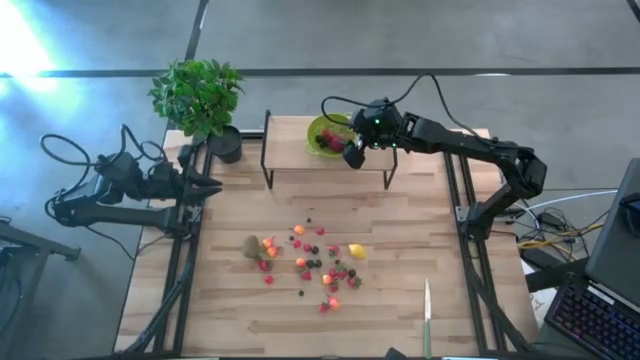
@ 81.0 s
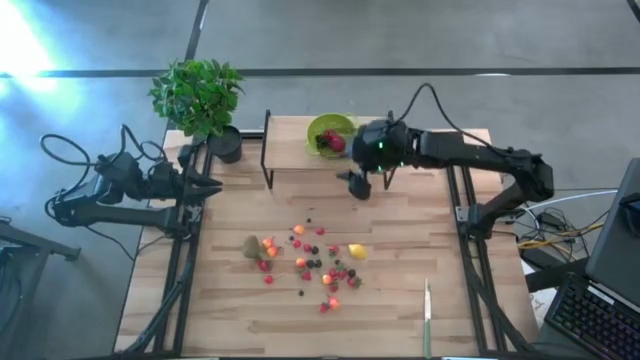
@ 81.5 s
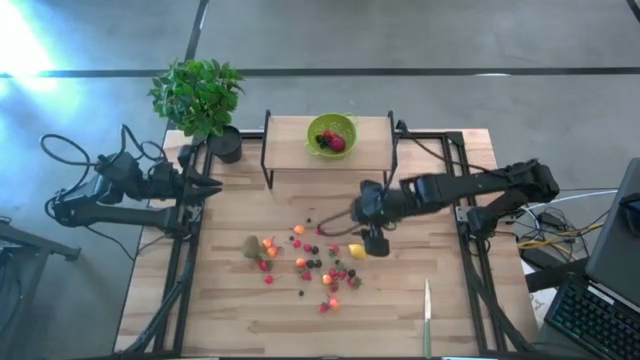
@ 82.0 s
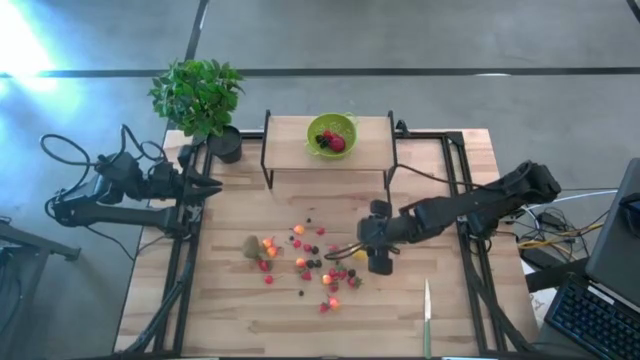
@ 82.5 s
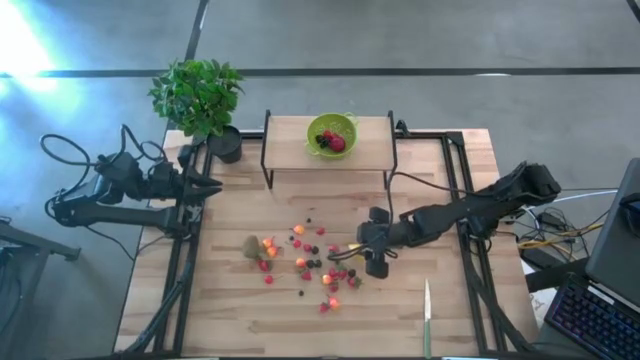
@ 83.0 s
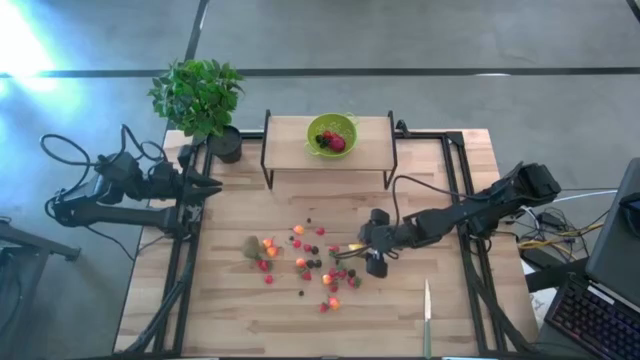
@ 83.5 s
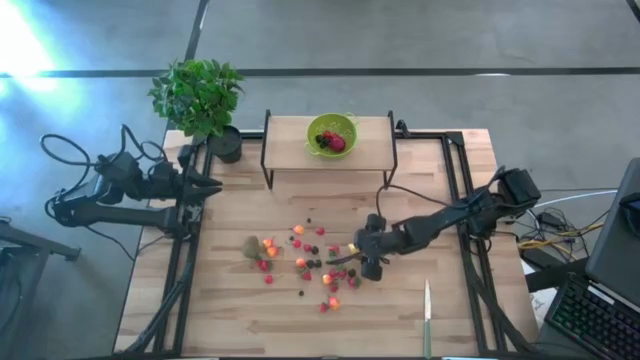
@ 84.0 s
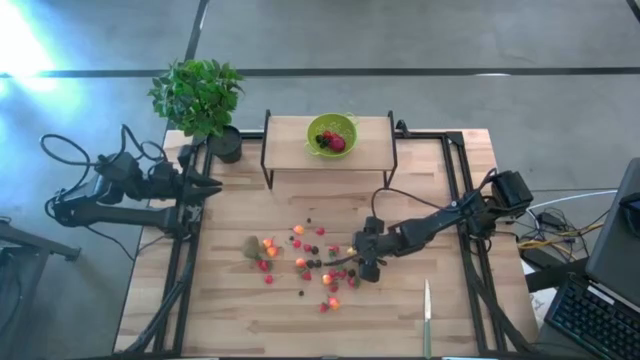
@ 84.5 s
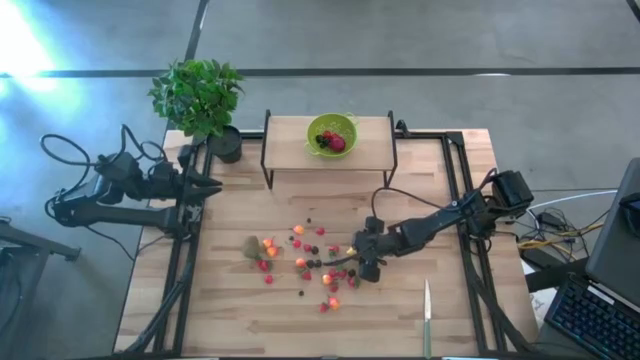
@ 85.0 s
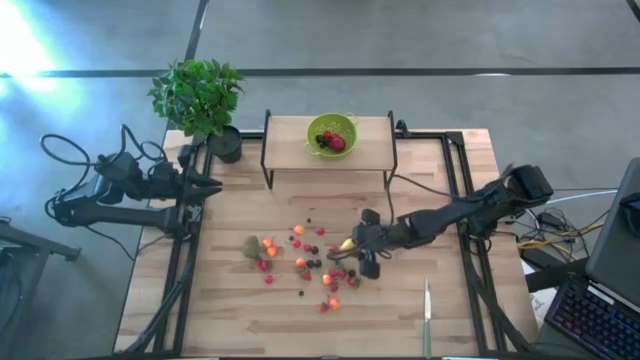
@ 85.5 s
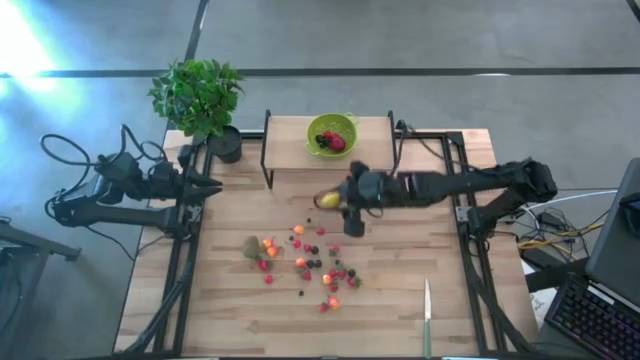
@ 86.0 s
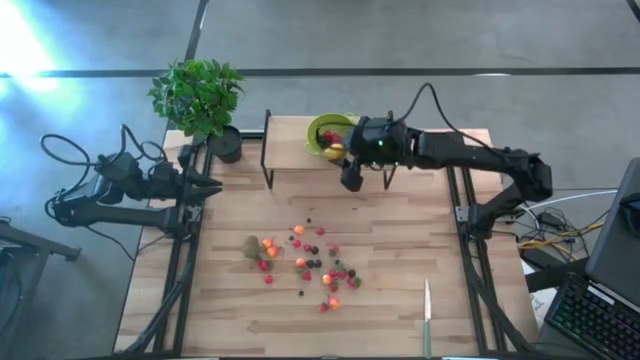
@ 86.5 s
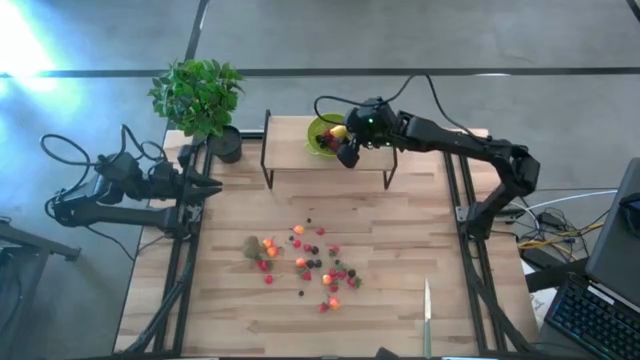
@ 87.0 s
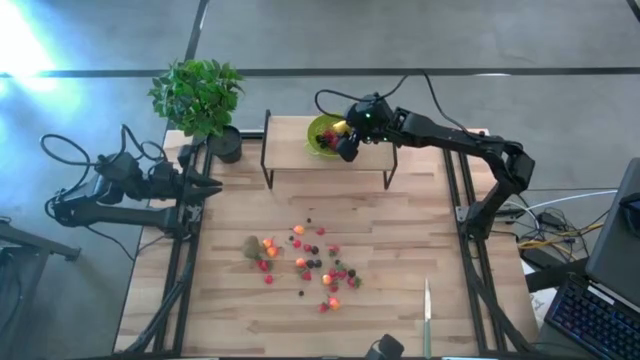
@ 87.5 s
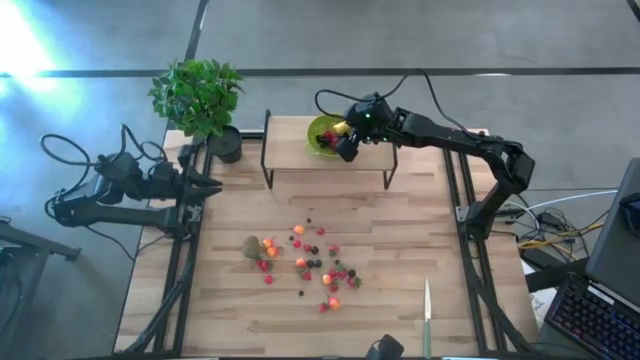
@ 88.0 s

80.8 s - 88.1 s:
Task: Pick & Place Fruit
Put the yellow lemon into the green strainer bowl on the shelf

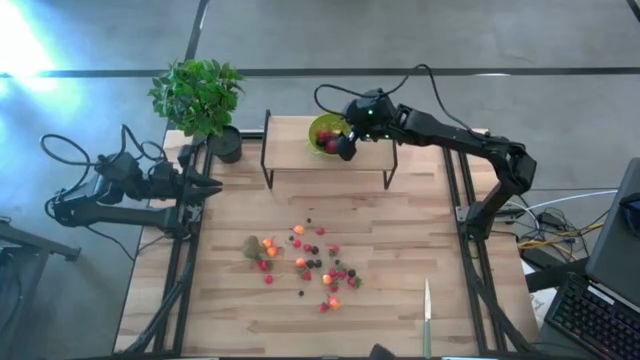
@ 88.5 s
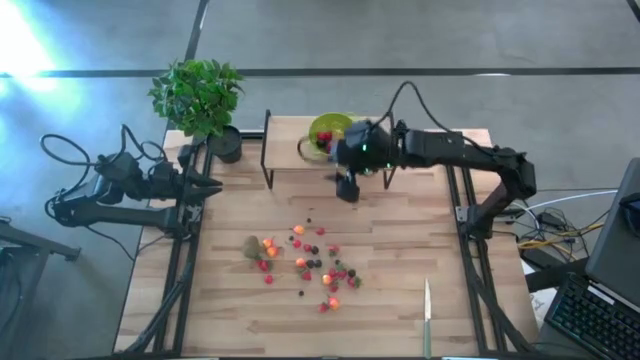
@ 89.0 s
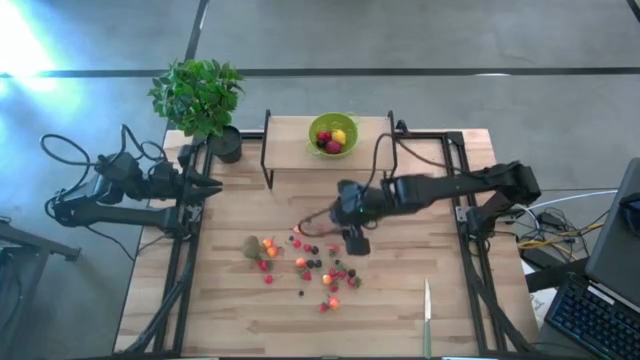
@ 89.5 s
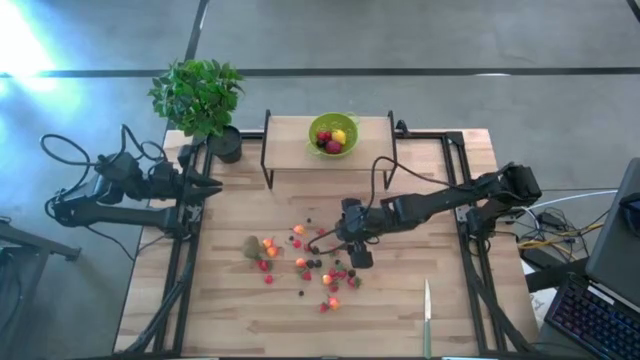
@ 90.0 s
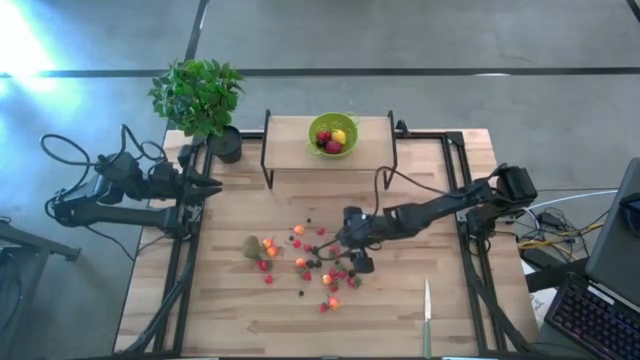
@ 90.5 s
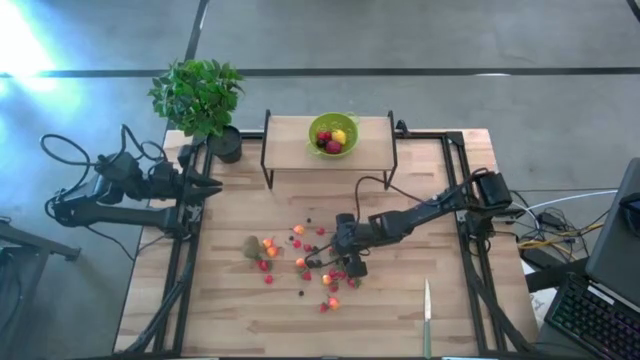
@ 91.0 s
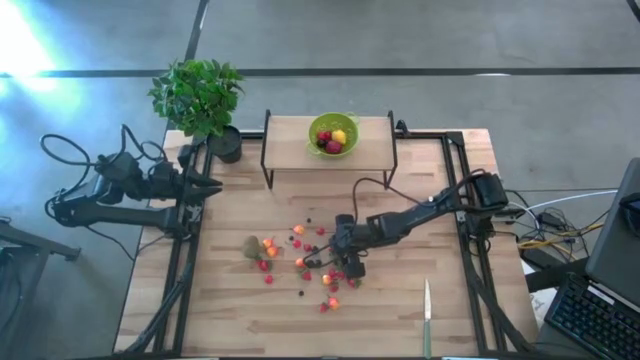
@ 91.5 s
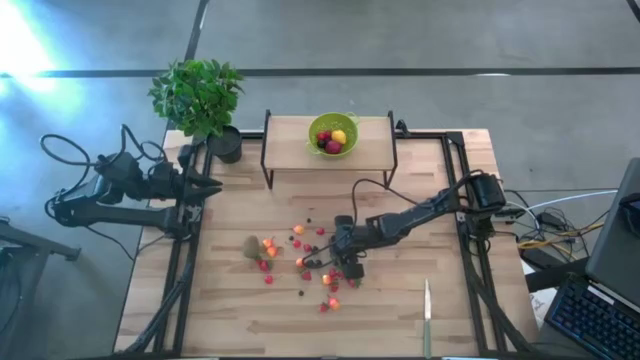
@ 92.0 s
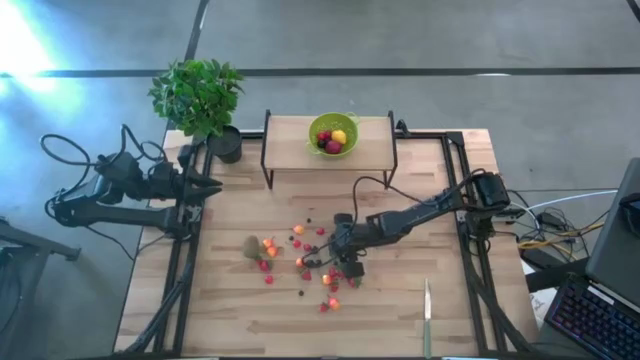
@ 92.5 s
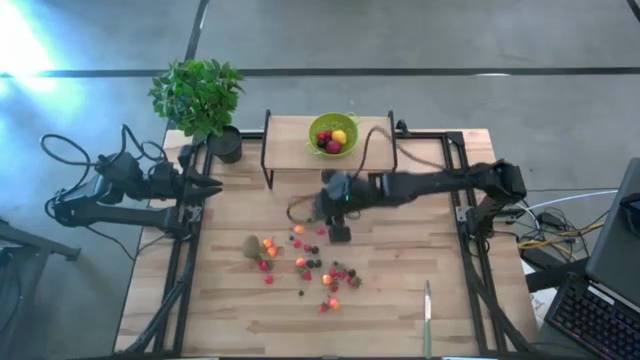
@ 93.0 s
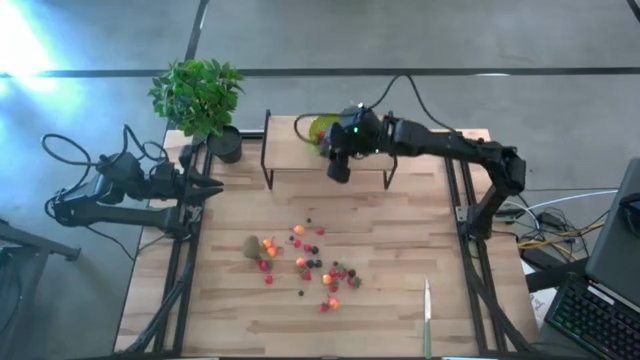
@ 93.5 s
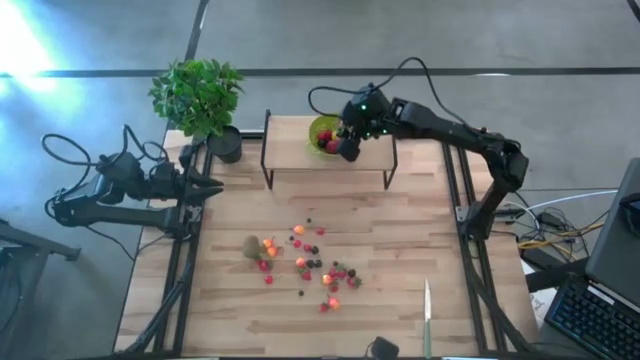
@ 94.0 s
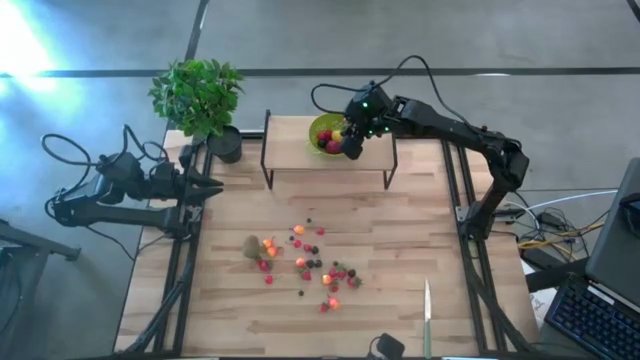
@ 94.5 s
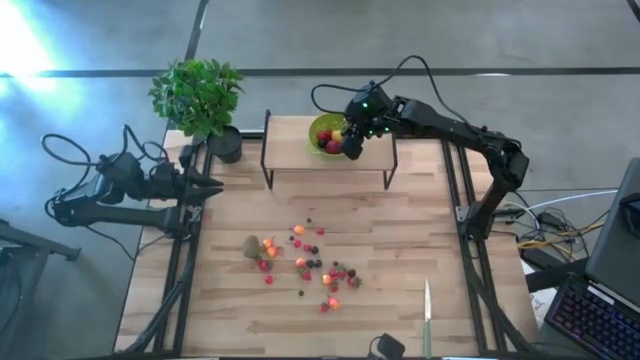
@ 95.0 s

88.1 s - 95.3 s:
Put the red strawberry into the green strainer bowl on the shelf

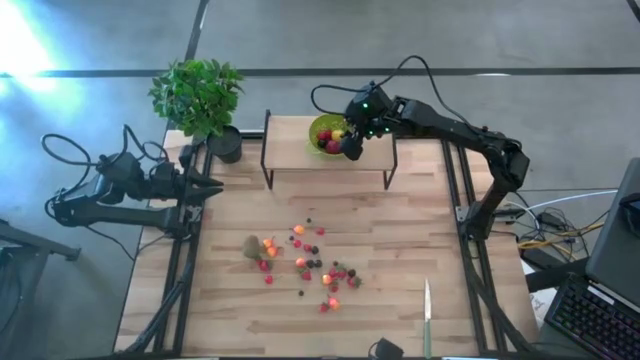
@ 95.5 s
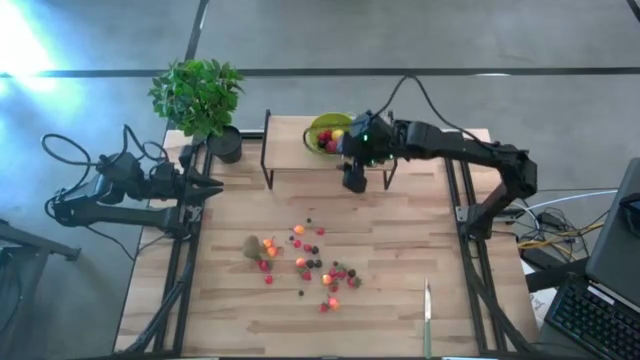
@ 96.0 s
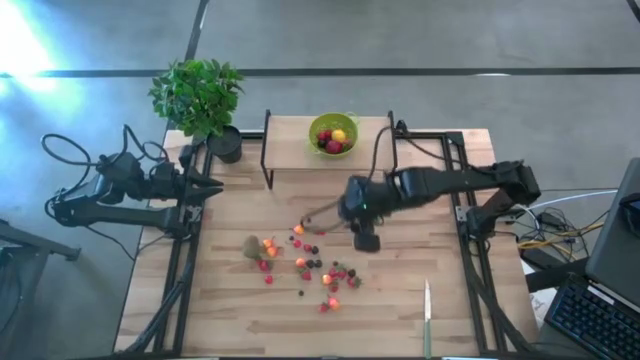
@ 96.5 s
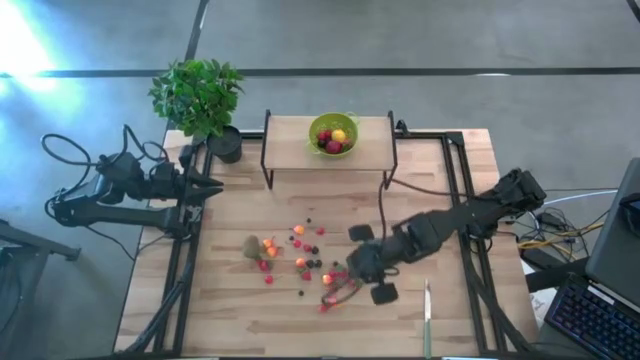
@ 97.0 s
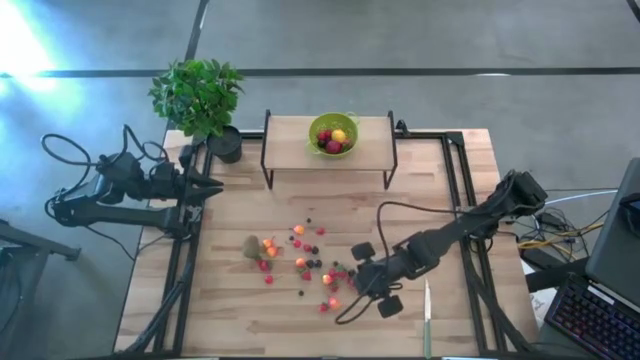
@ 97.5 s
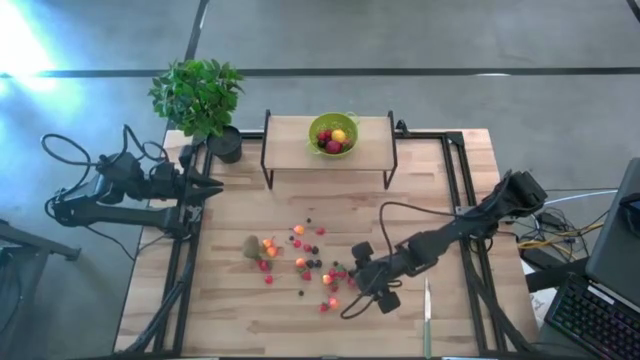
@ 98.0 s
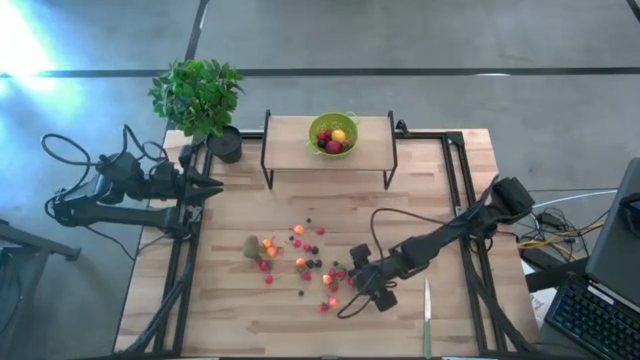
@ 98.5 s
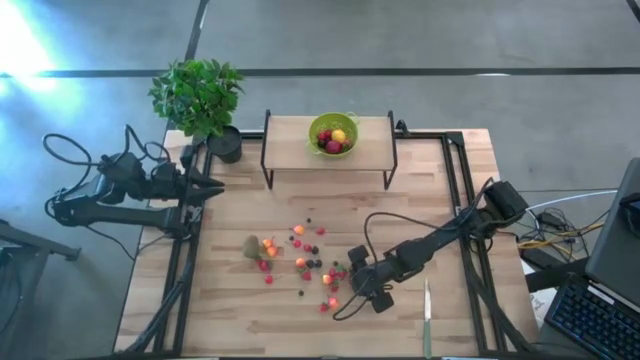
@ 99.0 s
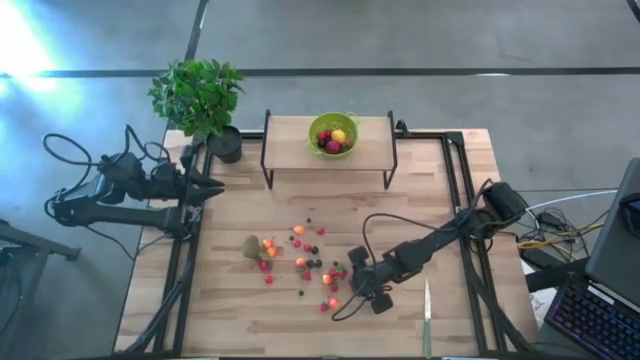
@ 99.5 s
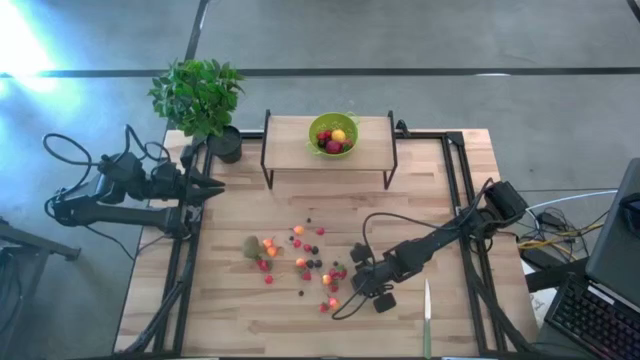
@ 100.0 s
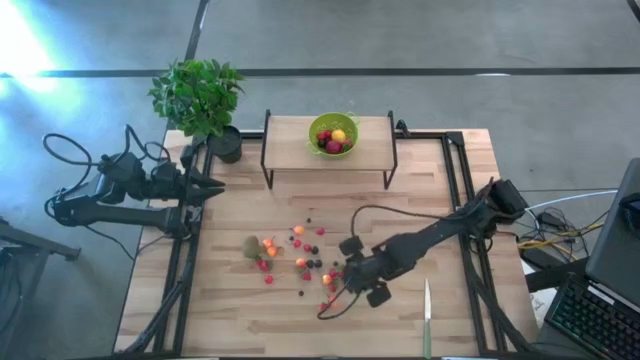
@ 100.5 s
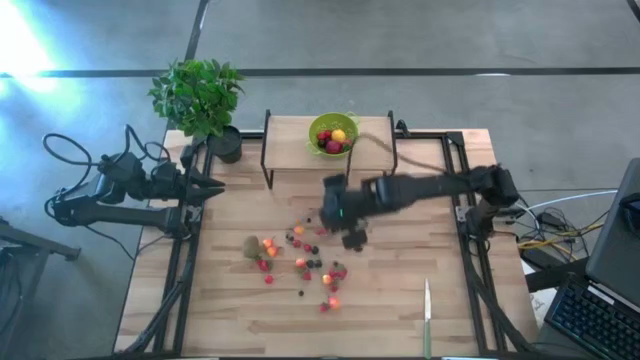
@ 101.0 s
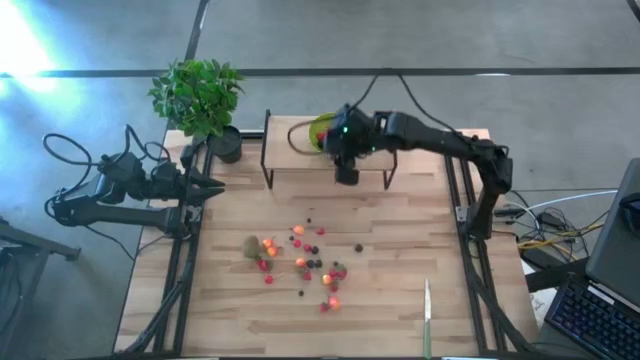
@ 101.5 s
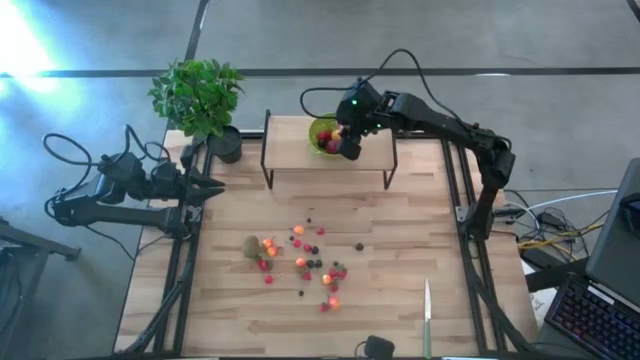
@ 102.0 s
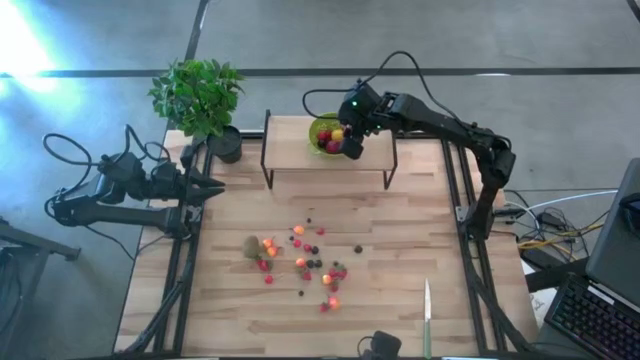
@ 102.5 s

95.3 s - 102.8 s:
Put the red strawberry into the green strainer bowl on the shelf
